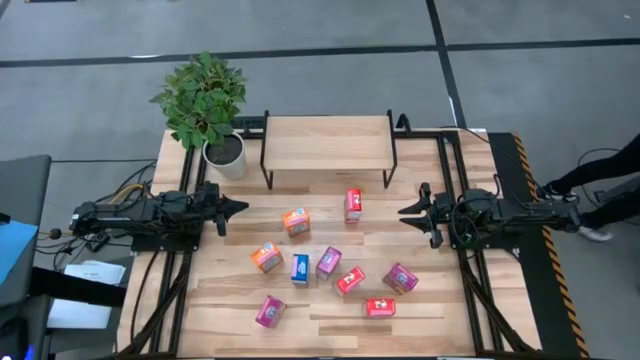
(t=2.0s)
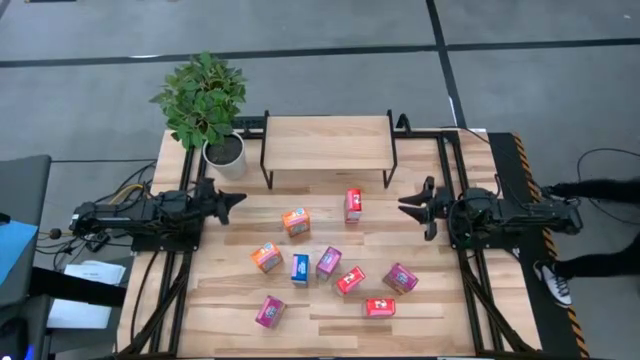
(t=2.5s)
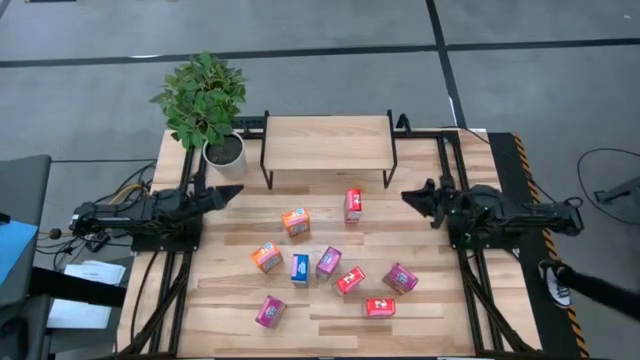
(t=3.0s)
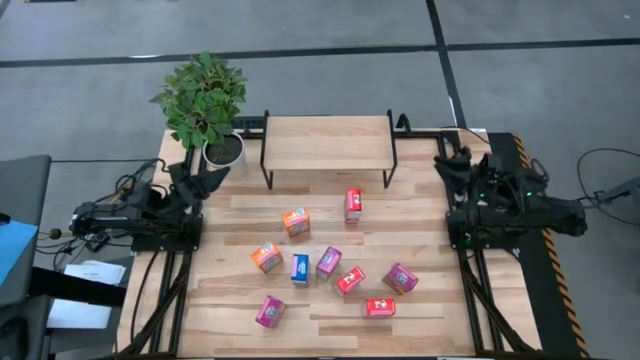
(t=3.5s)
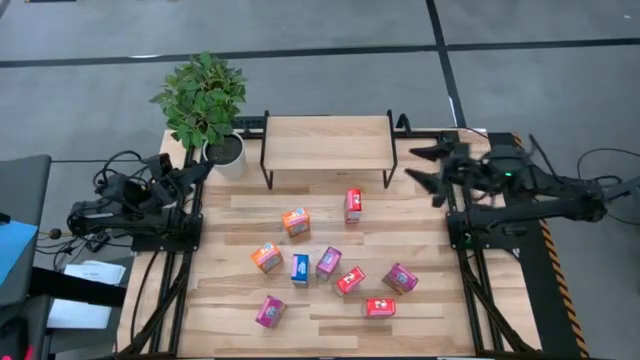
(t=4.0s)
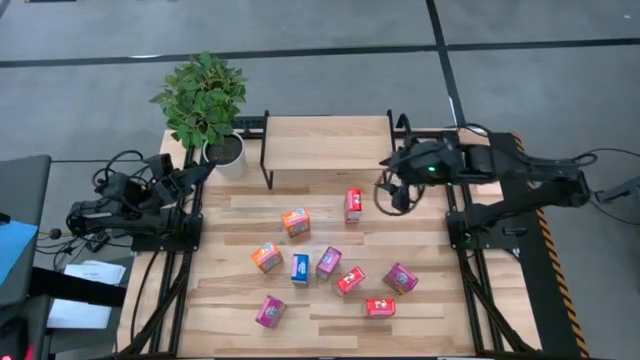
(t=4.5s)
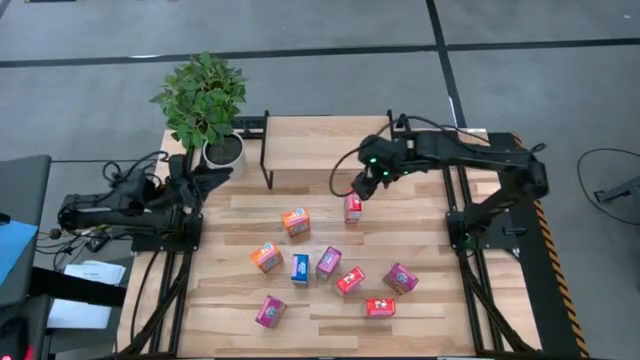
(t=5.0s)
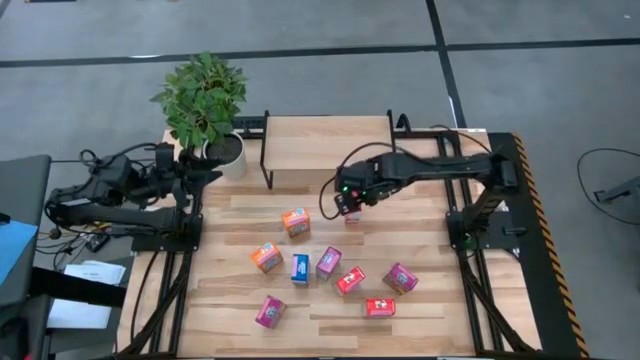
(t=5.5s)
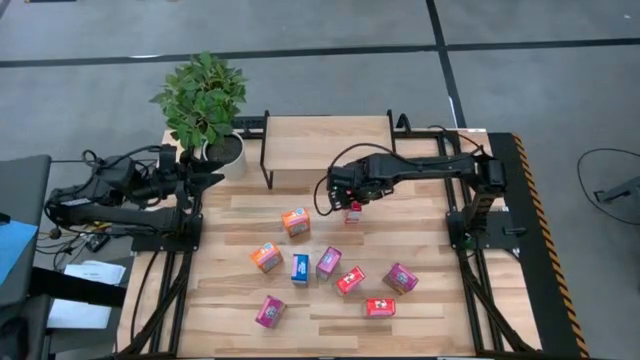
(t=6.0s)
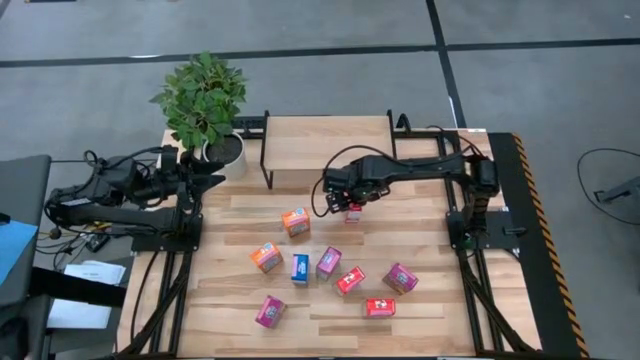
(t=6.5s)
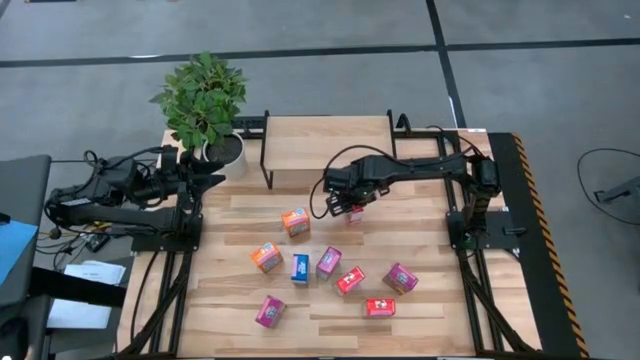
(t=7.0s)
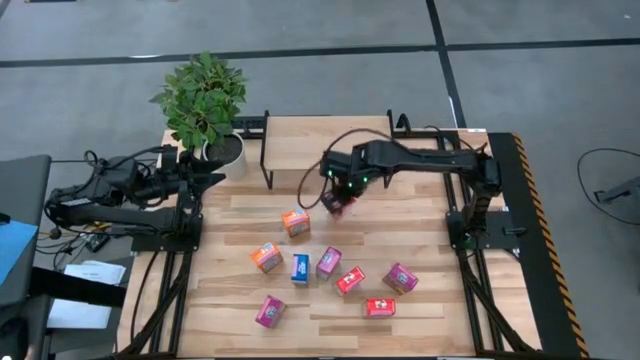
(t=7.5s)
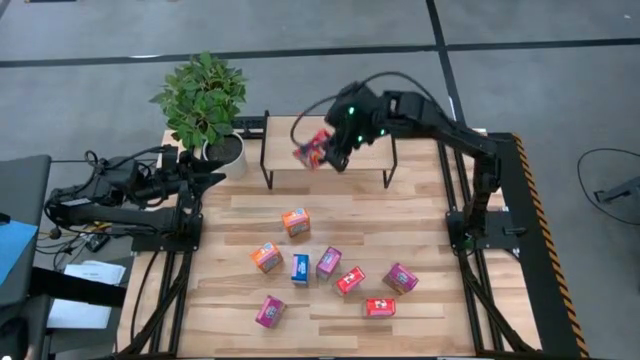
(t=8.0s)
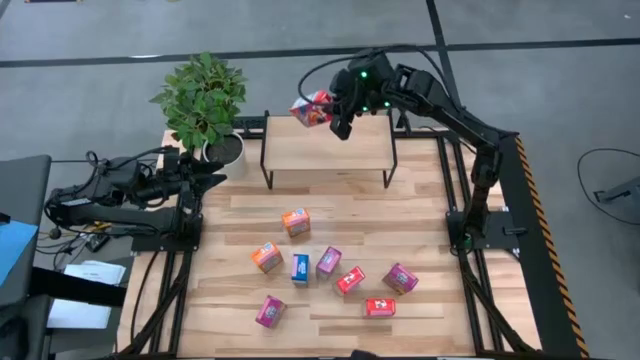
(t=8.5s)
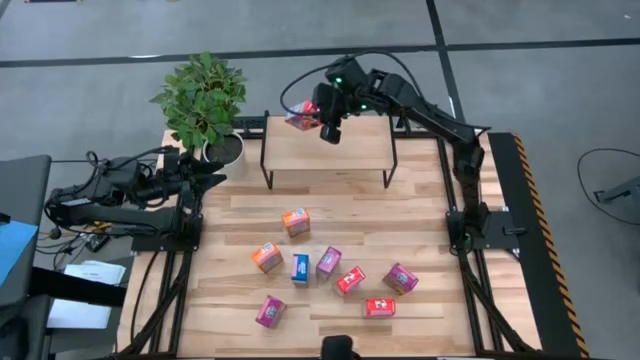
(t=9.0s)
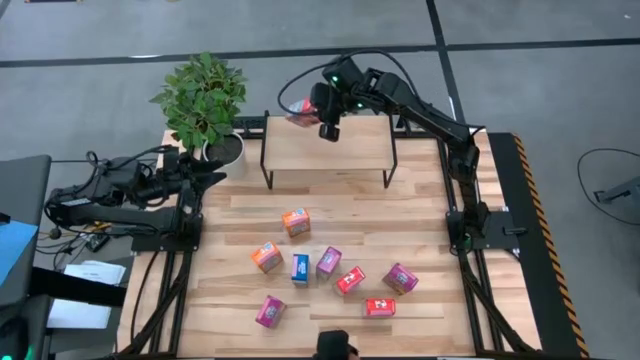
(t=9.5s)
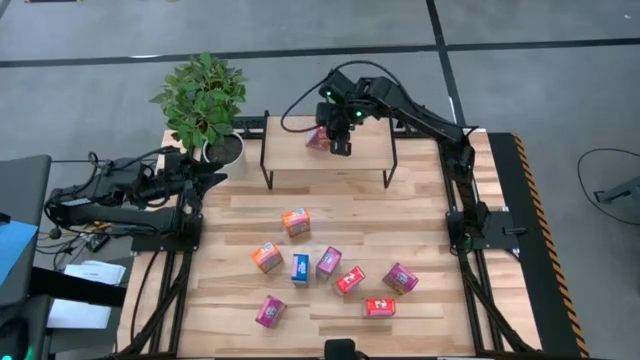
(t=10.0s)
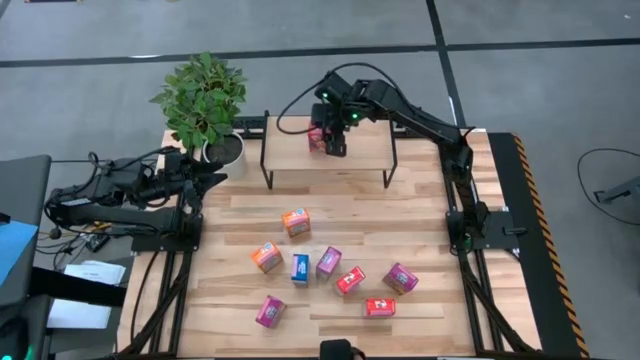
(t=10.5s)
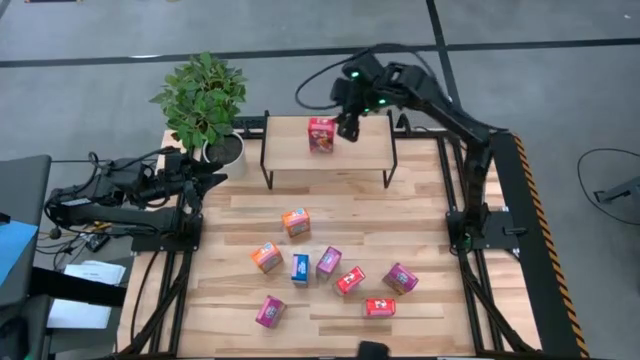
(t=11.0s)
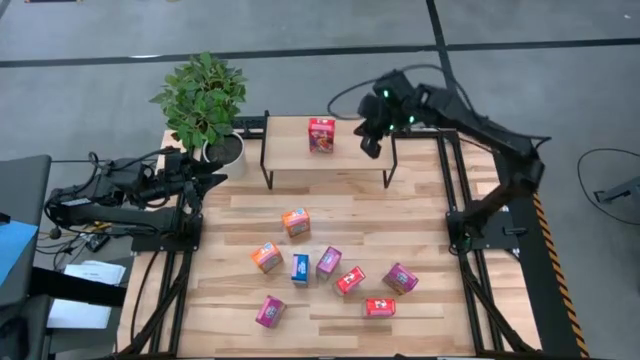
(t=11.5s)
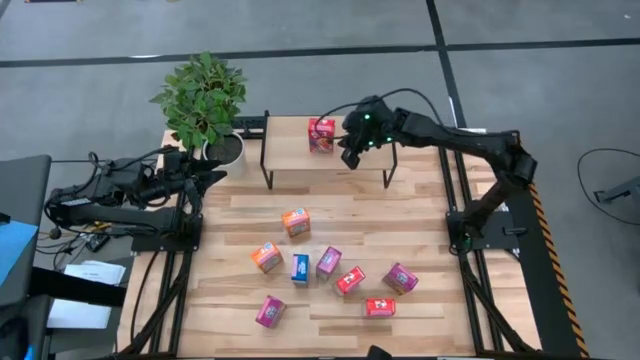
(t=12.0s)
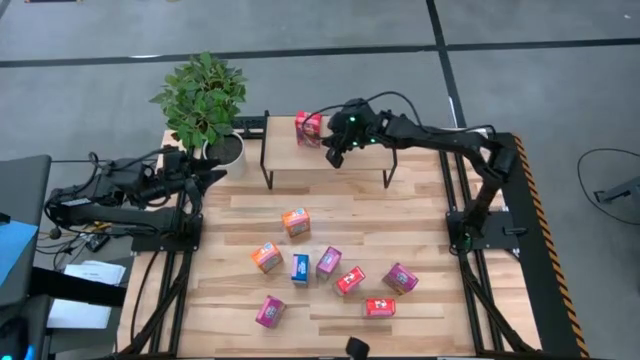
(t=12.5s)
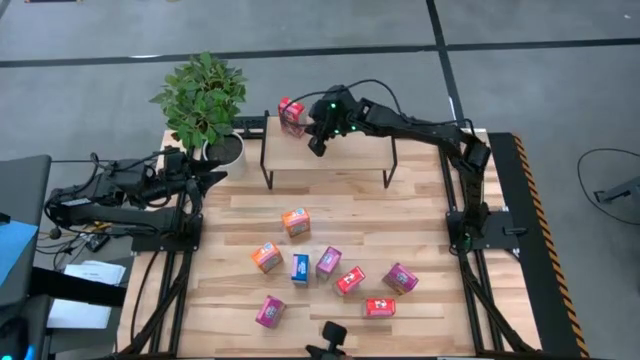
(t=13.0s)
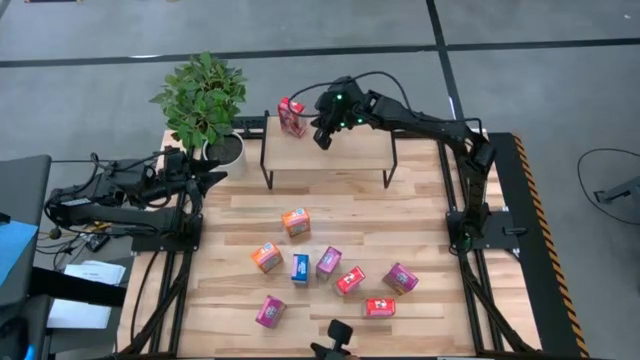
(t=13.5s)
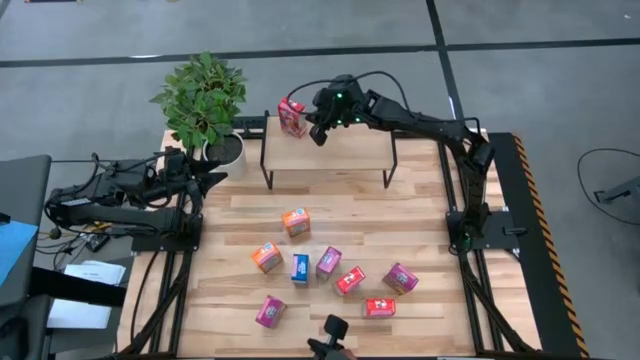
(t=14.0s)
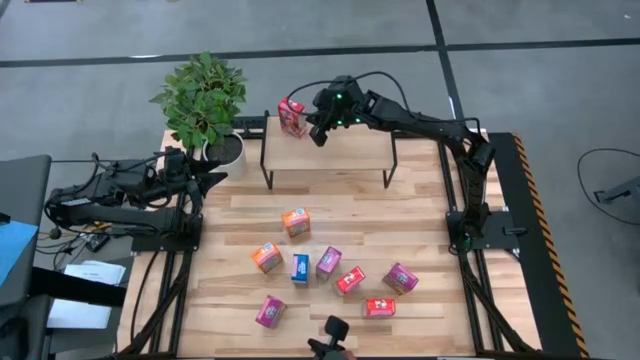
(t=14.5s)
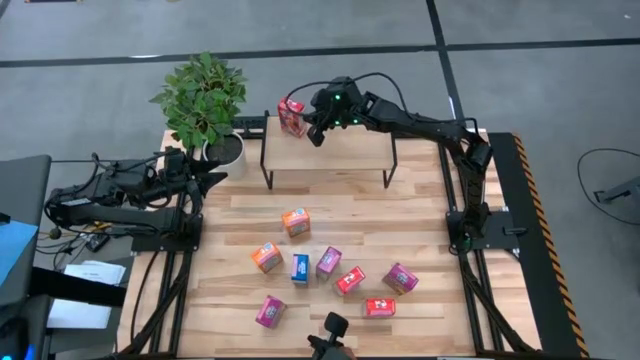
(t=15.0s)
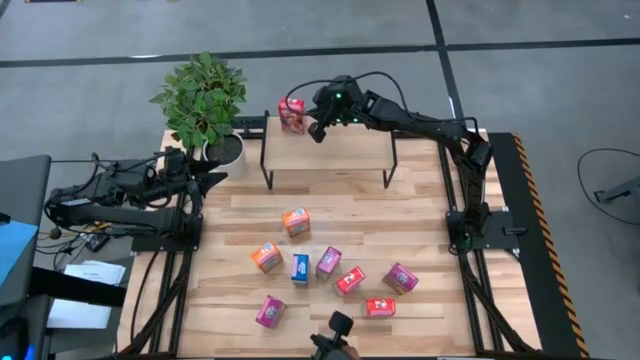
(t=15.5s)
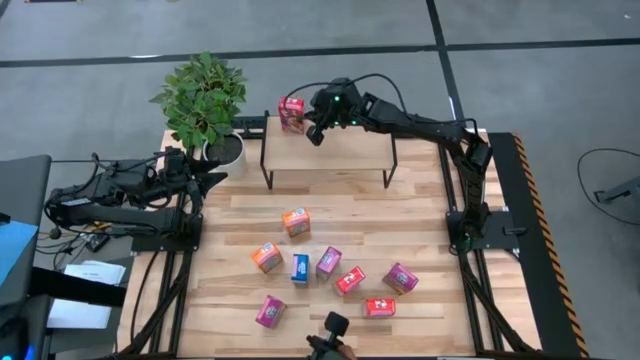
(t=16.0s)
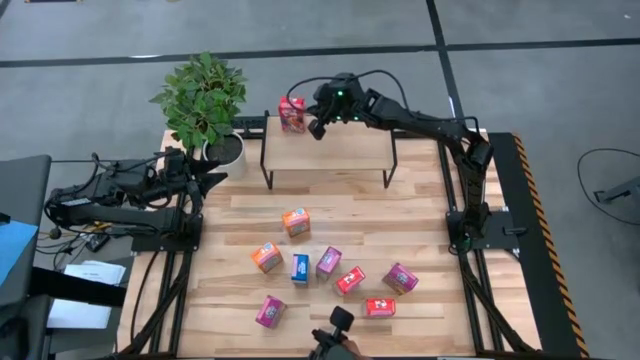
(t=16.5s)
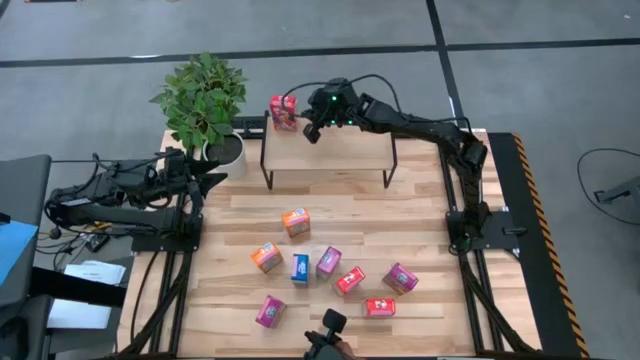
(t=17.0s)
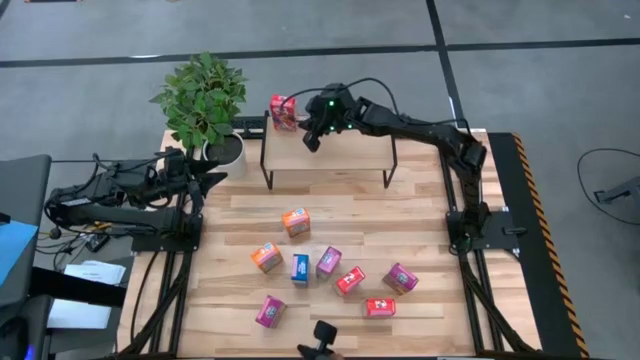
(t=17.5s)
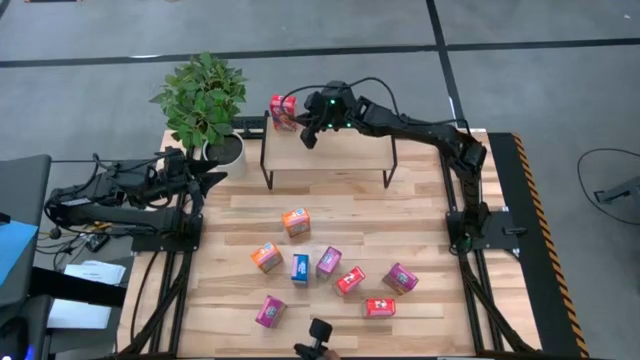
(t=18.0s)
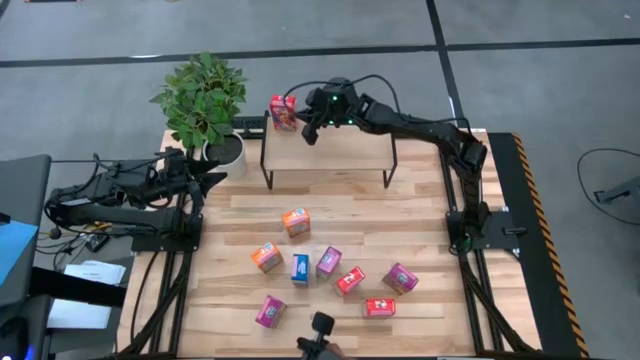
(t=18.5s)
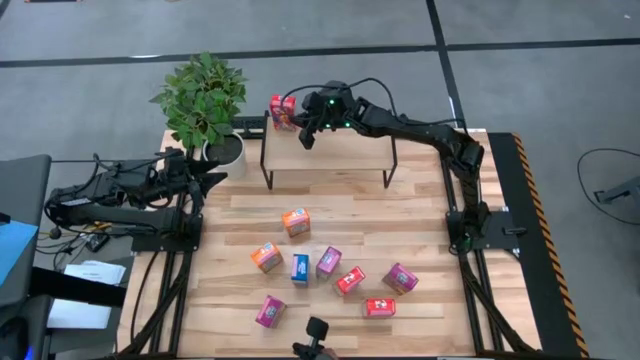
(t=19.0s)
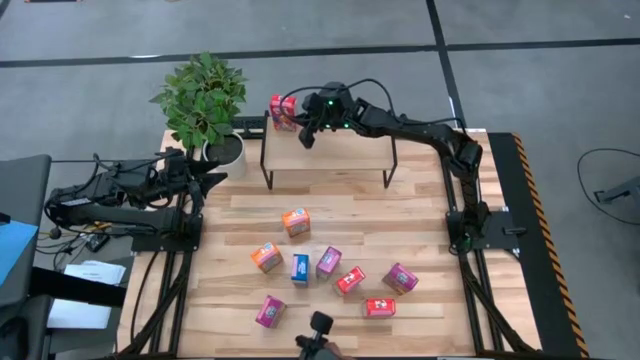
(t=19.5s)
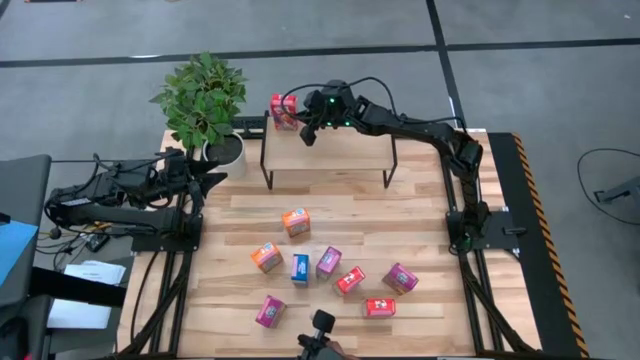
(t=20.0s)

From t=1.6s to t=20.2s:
Task: Stack cereal on shelf
Put the top red cereal box on the shelf

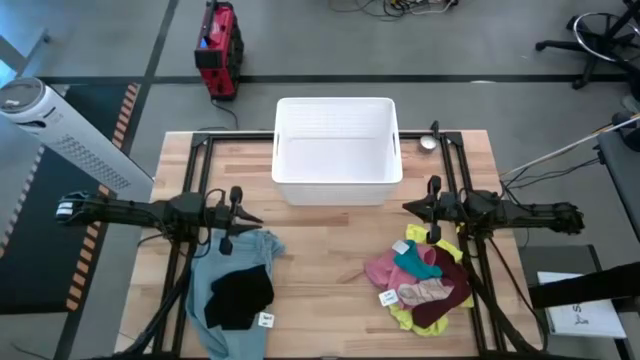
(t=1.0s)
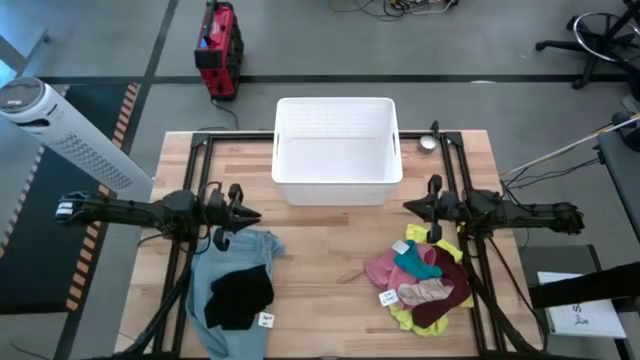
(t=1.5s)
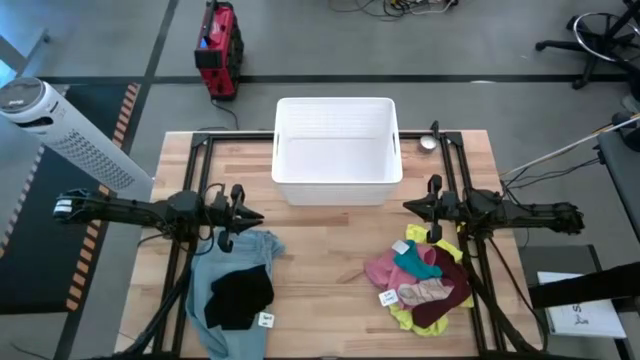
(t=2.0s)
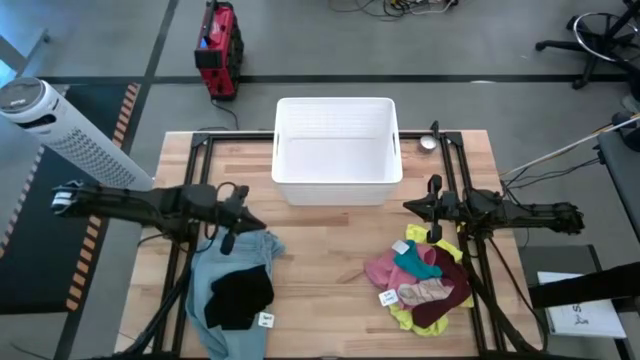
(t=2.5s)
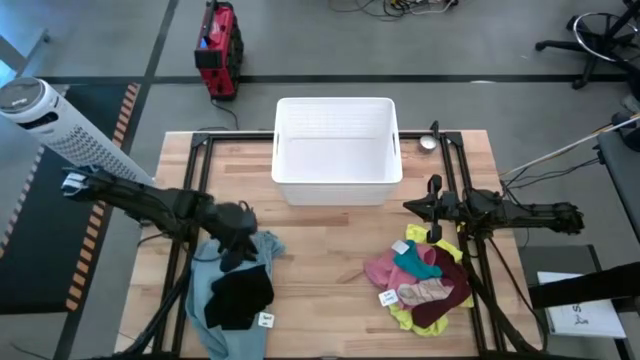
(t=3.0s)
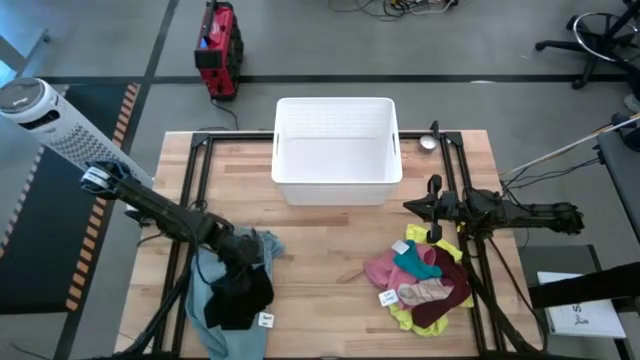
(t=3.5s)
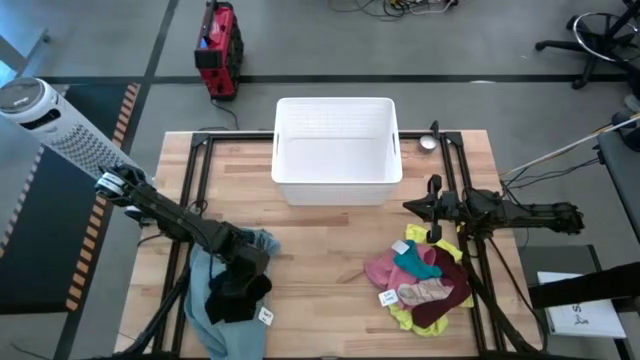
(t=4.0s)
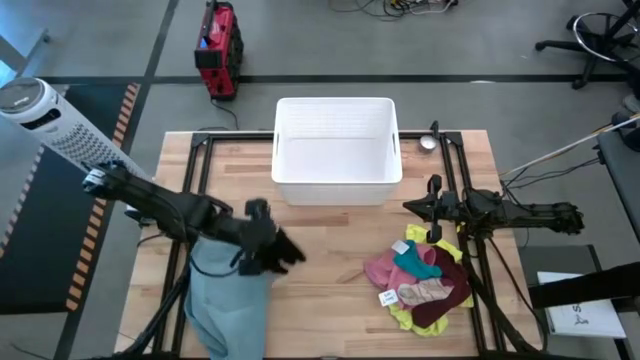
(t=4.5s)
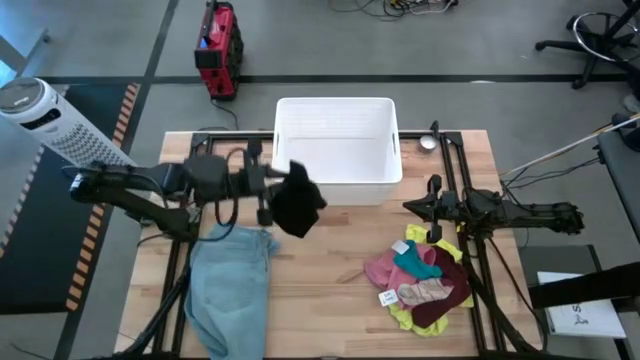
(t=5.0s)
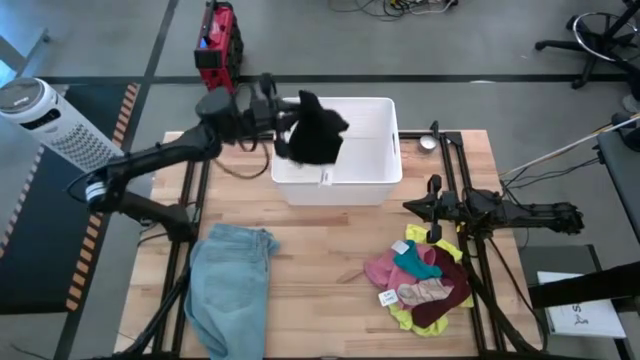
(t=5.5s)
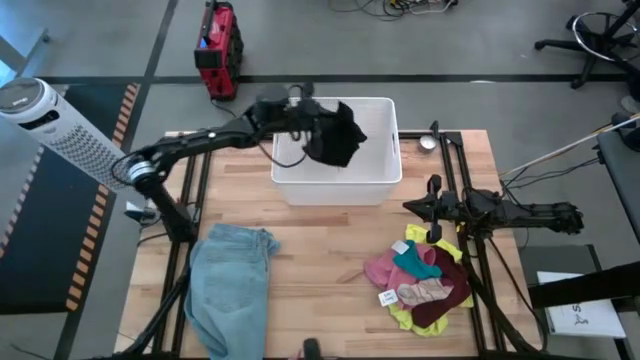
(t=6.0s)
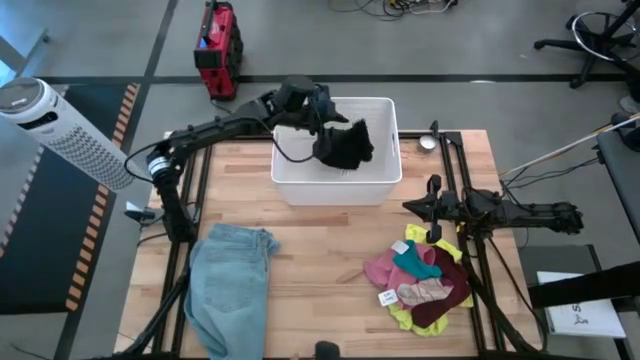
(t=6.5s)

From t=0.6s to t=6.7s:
Task: Sort clothes
Put the black underwear into the white laundry bin
